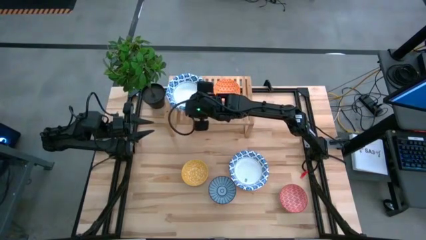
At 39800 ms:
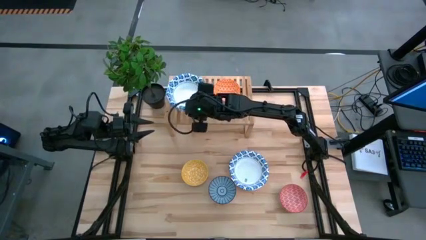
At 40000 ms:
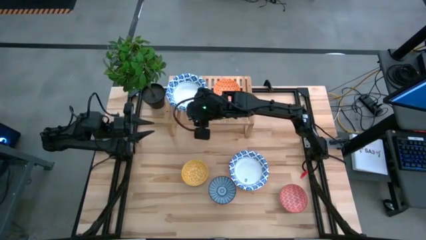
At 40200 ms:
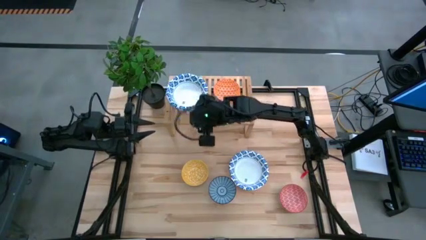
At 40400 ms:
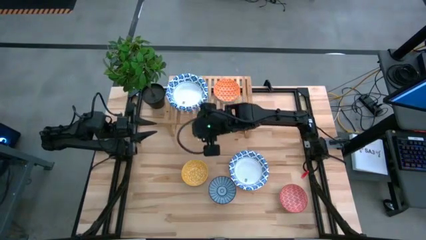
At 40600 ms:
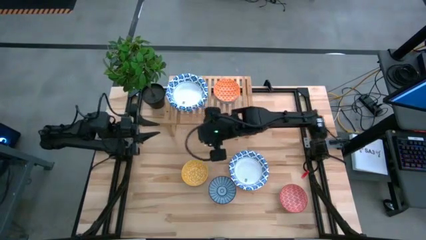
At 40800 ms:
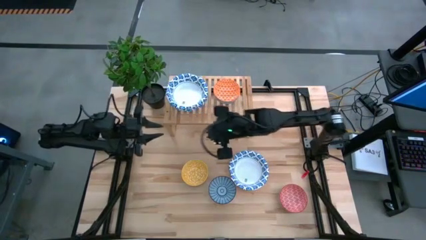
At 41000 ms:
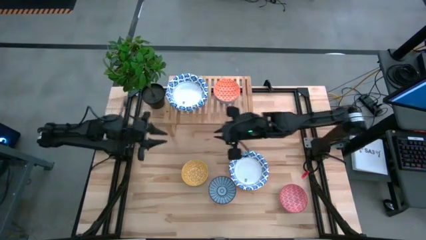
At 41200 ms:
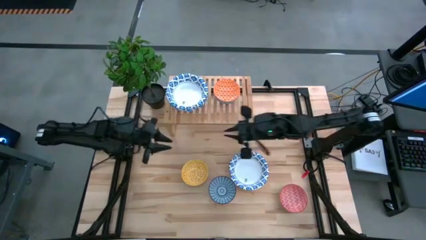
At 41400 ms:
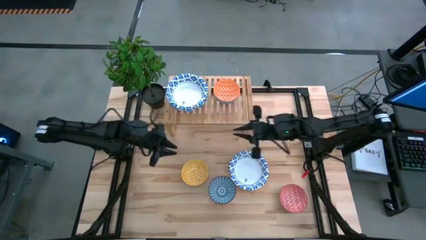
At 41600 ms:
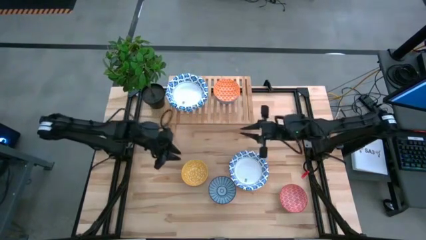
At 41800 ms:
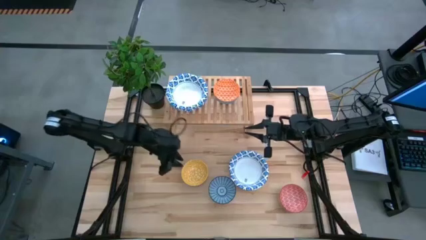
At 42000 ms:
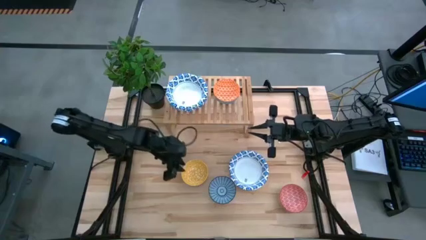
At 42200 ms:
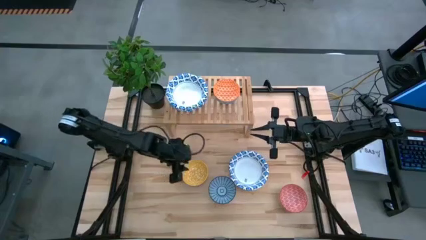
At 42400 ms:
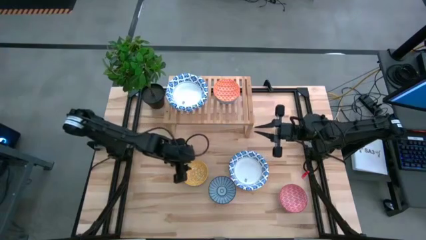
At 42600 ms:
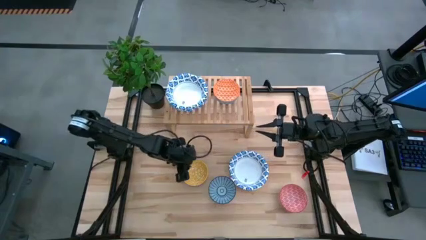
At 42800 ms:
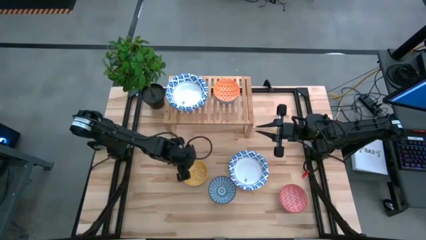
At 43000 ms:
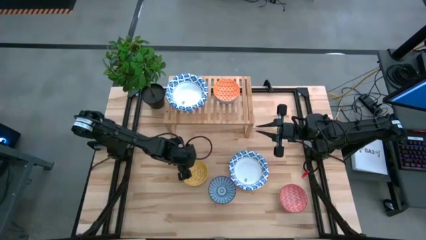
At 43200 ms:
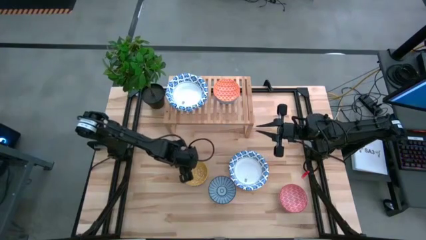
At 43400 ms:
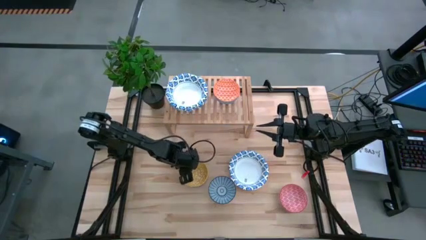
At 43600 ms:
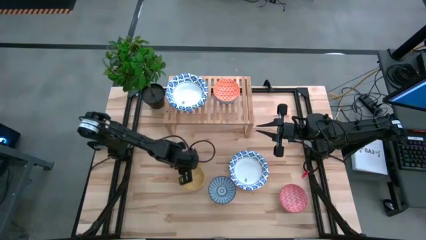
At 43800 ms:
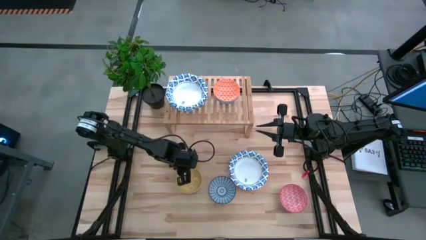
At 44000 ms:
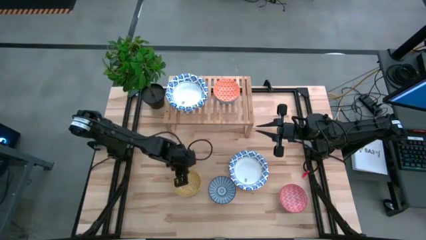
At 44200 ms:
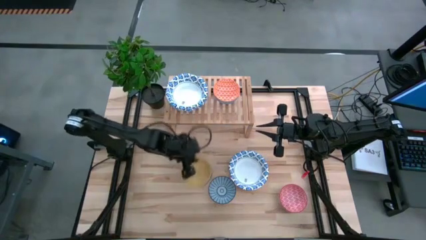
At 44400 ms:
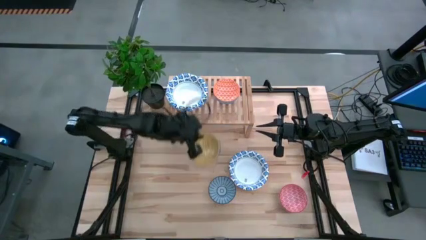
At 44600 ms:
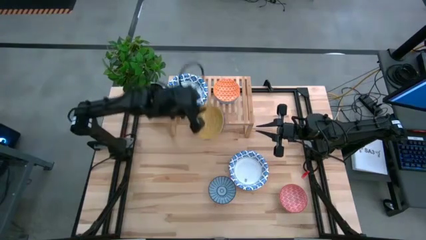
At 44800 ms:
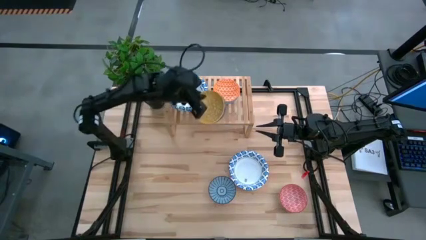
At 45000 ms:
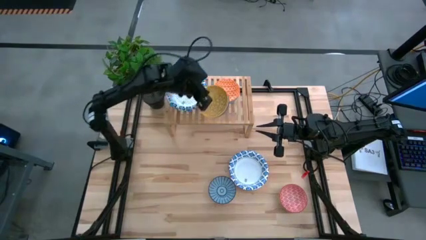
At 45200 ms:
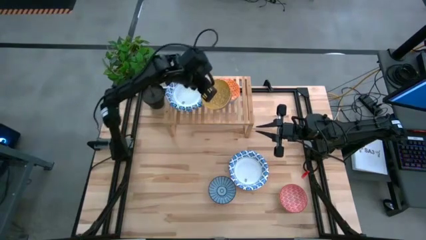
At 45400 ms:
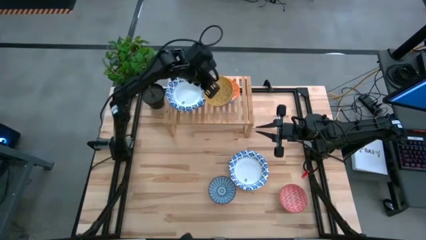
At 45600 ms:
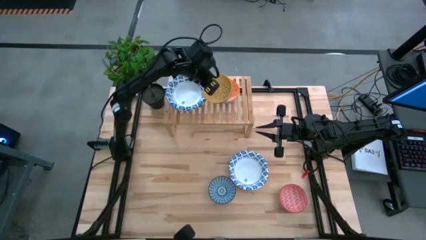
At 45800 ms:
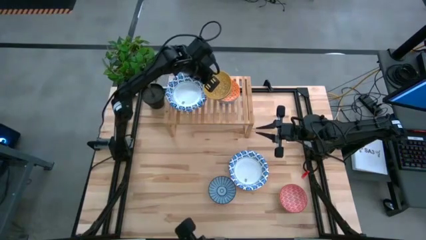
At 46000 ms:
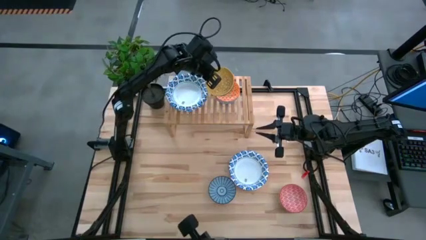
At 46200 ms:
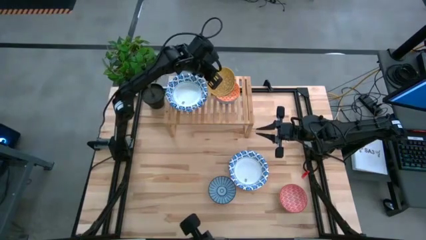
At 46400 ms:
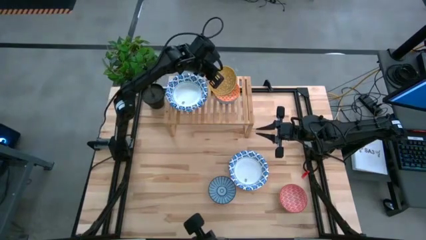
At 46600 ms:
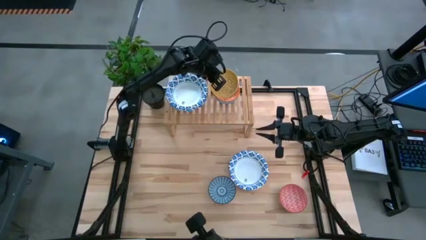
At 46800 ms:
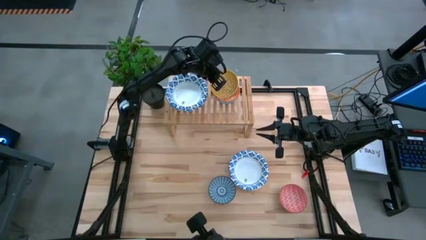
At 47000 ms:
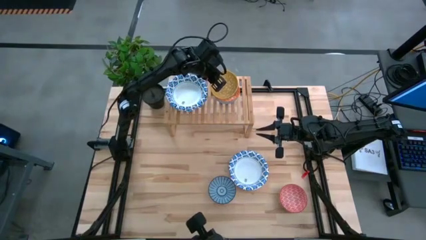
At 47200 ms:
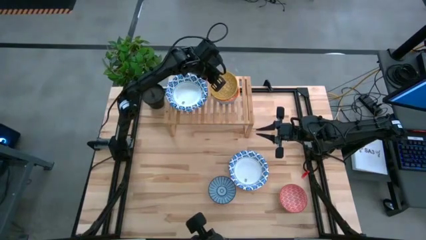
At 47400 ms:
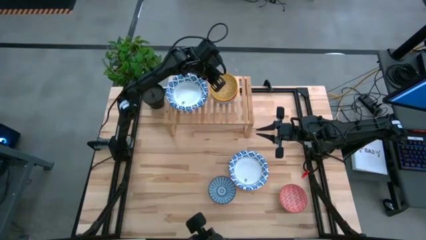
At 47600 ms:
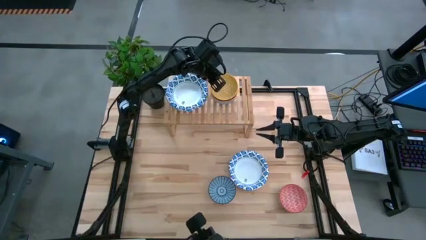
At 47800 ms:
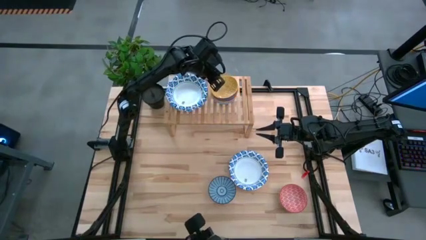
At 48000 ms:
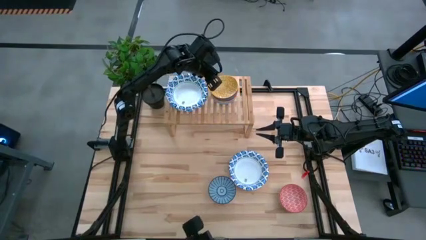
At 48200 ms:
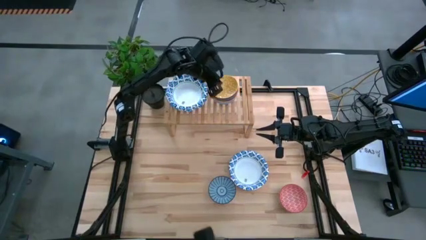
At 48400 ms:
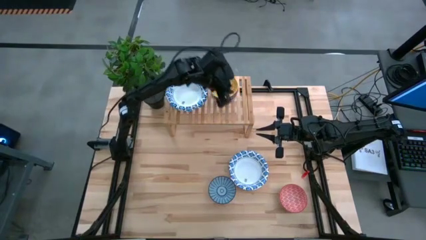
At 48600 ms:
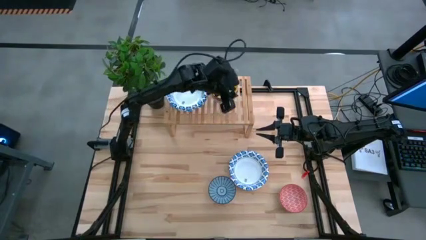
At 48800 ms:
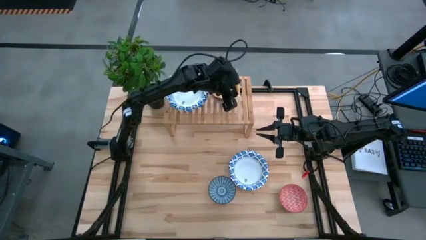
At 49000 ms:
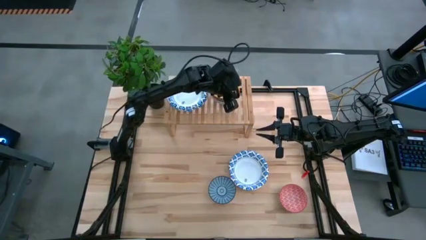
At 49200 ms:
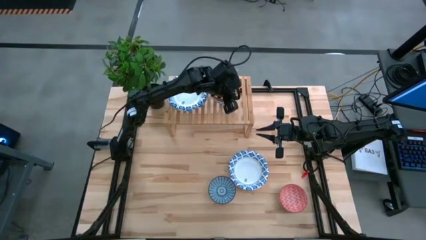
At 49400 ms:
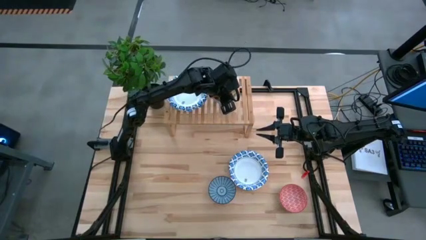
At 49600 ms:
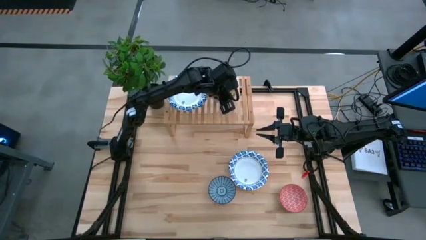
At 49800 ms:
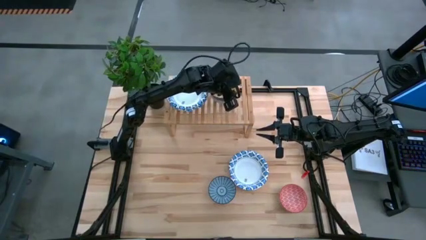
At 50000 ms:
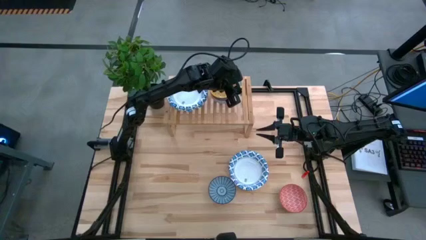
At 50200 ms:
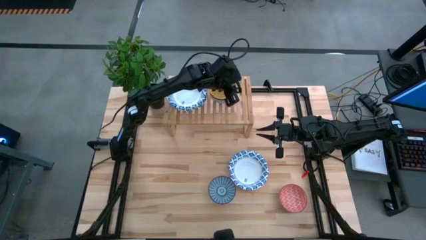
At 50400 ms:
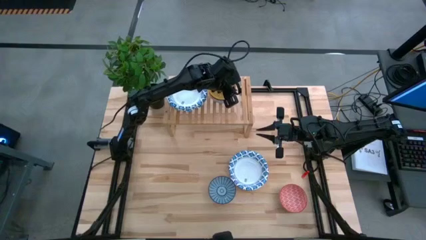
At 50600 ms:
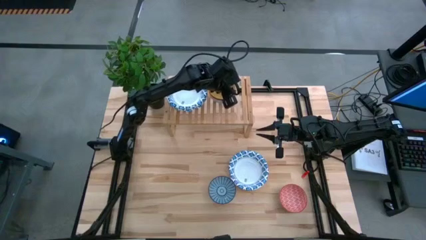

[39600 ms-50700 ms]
Task: Place and stack bowls onto a shelf
Stack the yellow patterned bowl on top of the blue orange patterned bowl on the shelf

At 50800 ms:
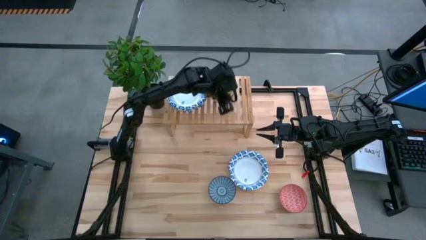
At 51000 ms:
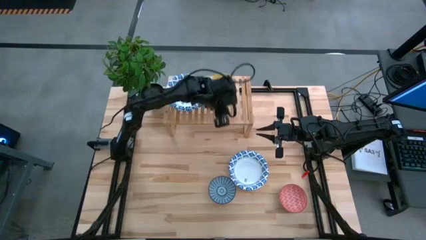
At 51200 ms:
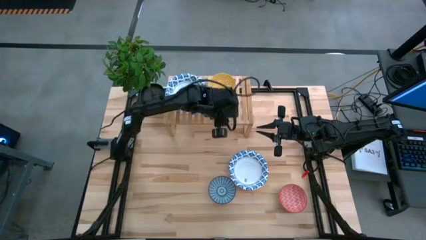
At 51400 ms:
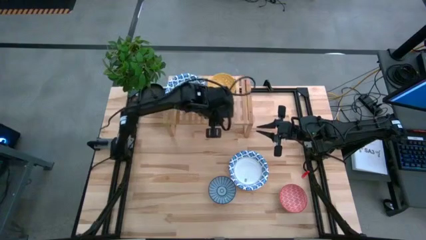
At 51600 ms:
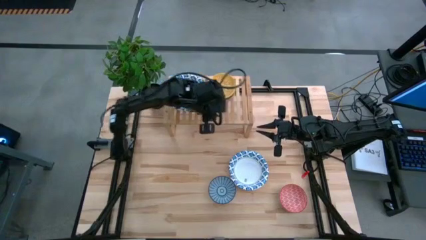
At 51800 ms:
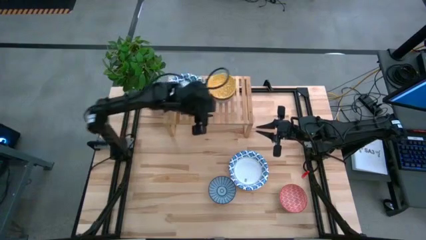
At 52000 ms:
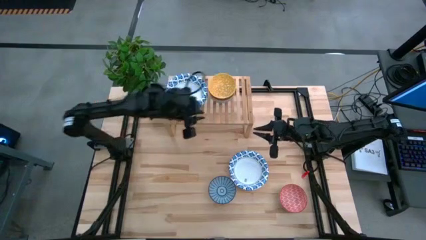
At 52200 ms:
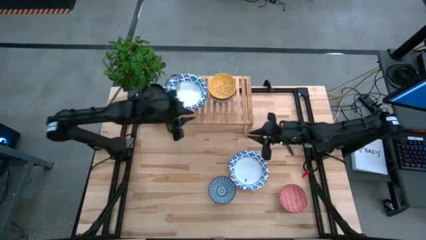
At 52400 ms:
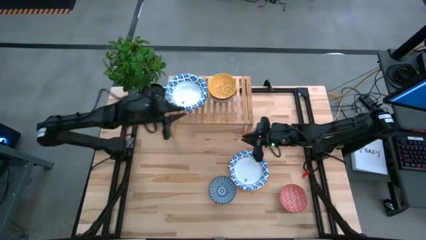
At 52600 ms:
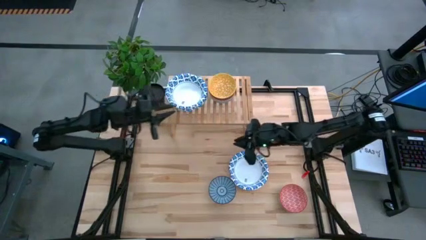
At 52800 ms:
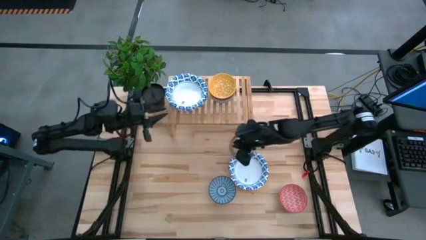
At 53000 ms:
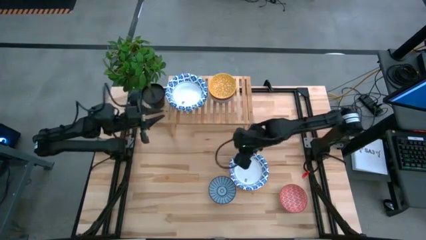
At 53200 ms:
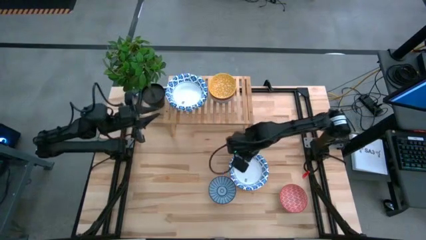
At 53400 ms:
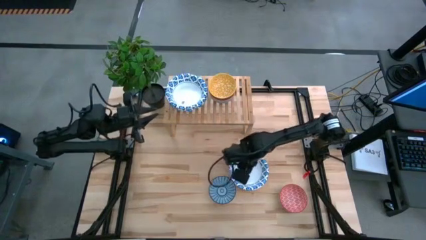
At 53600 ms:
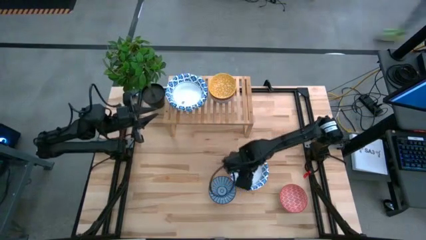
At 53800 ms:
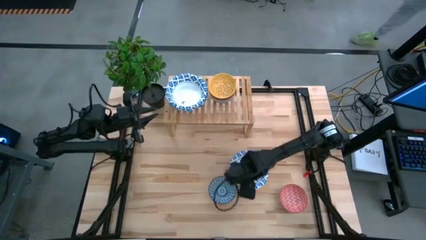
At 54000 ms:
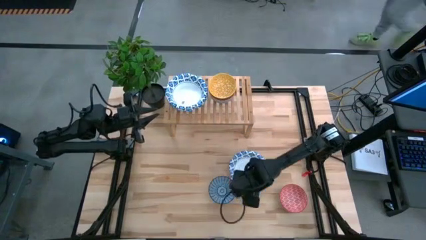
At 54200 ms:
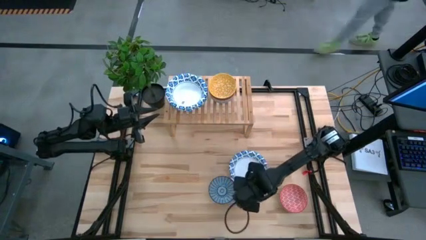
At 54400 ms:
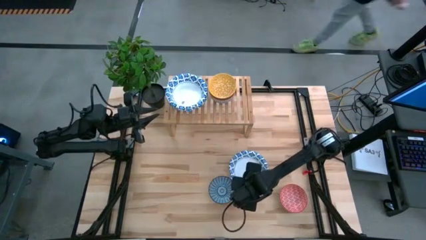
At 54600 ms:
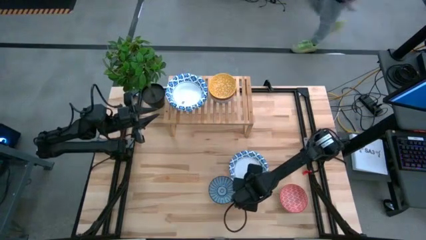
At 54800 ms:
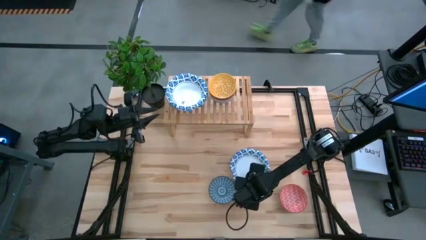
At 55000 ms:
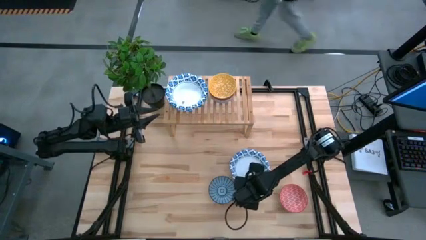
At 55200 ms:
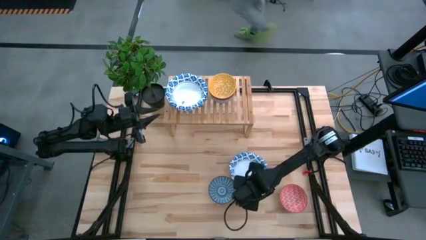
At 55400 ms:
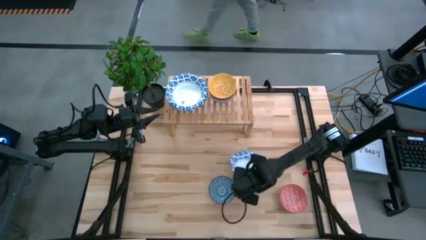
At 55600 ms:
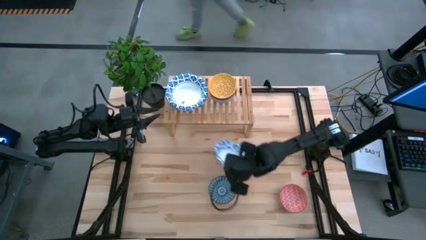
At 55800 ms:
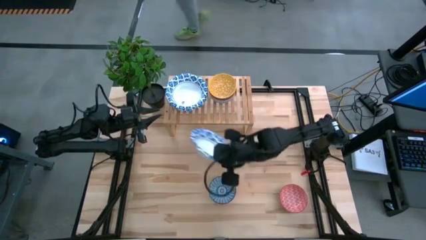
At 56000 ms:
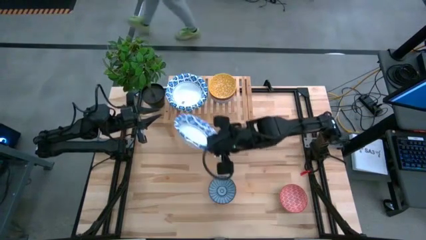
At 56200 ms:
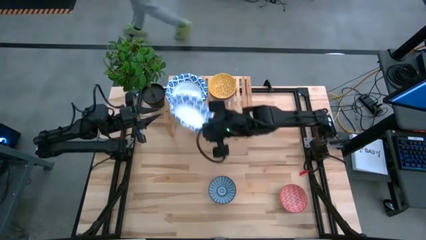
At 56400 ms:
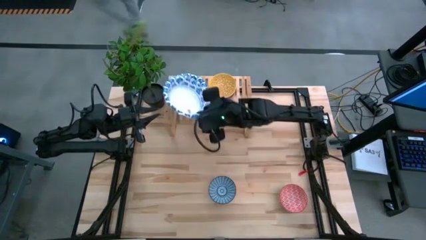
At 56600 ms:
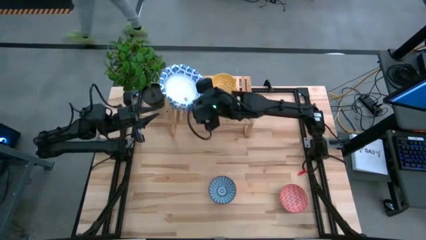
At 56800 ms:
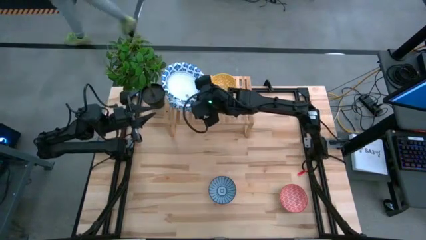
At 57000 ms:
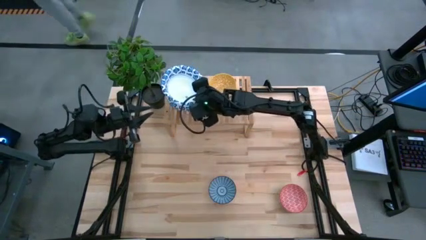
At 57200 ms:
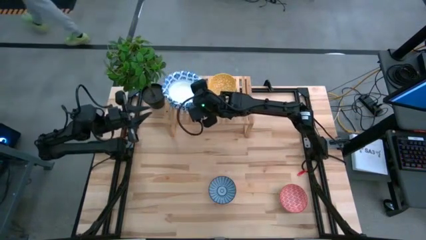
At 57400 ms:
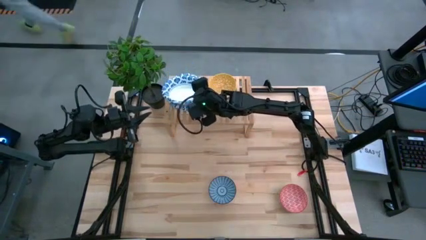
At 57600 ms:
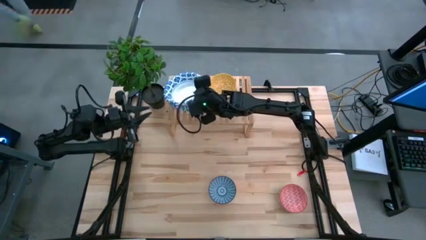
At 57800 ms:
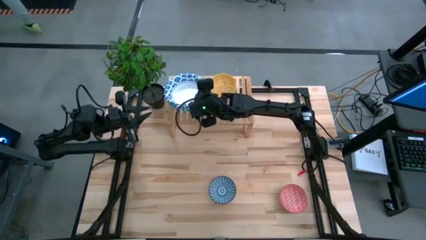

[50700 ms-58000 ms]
Stack the white blue patterned bowl on top of the white blue patterned bowl on the shelf
